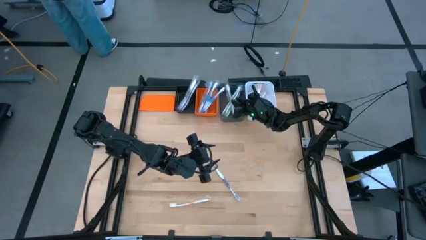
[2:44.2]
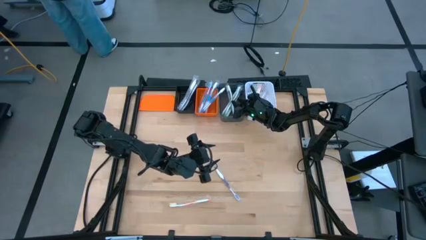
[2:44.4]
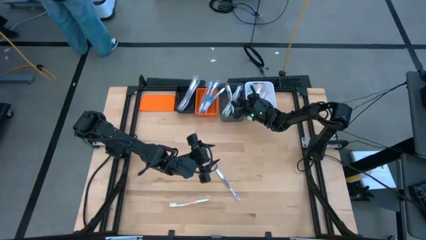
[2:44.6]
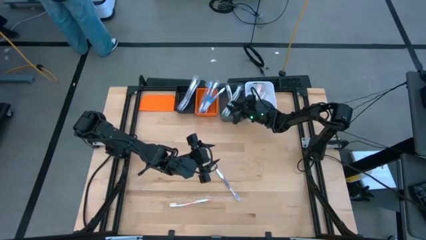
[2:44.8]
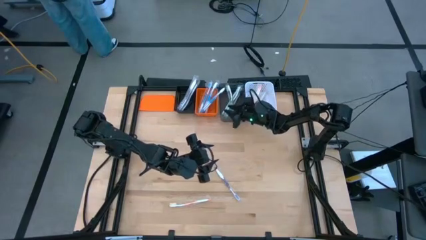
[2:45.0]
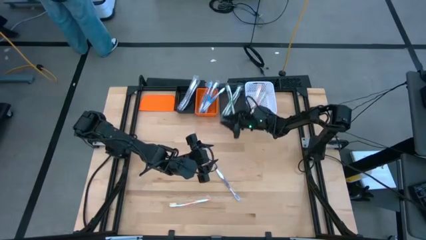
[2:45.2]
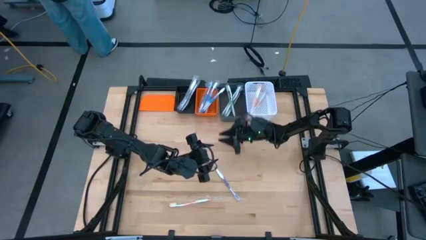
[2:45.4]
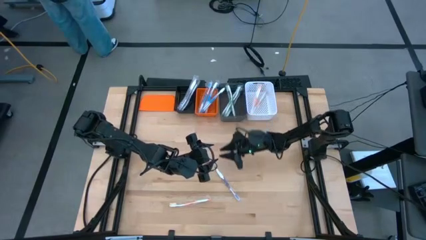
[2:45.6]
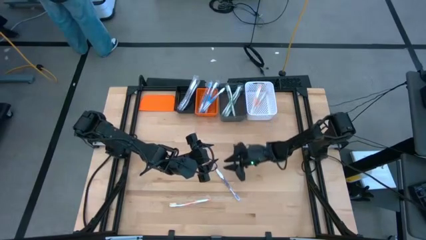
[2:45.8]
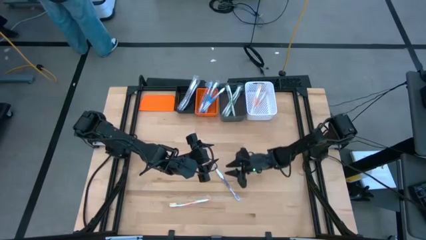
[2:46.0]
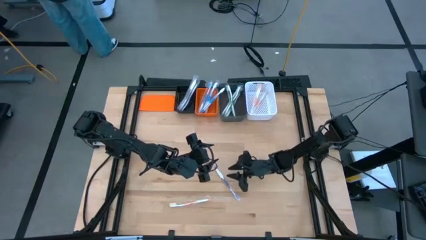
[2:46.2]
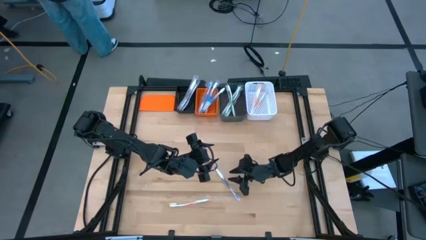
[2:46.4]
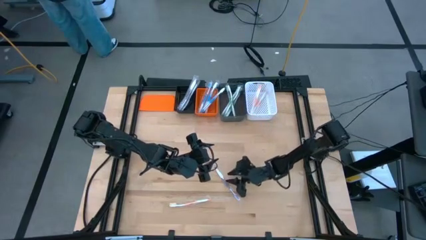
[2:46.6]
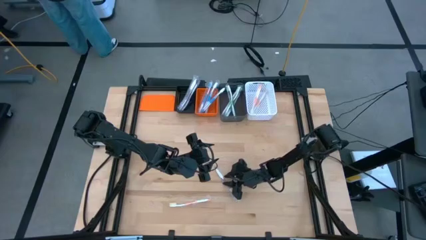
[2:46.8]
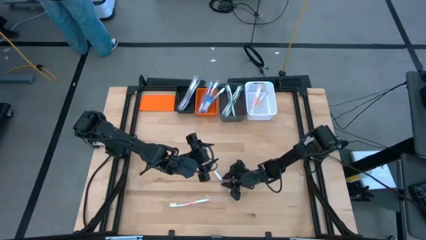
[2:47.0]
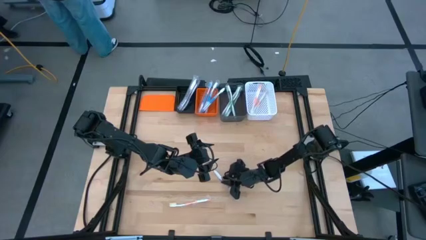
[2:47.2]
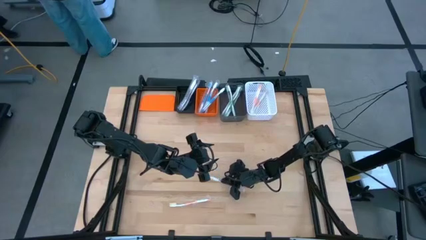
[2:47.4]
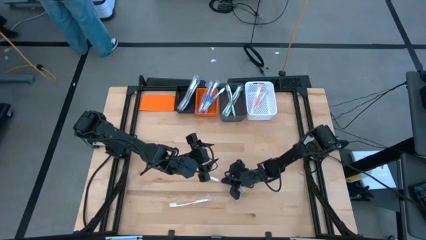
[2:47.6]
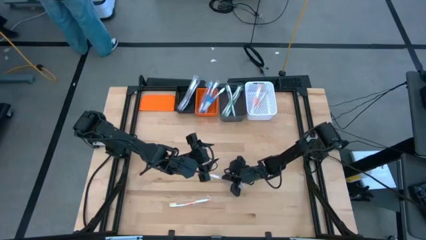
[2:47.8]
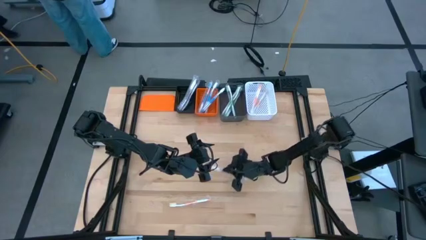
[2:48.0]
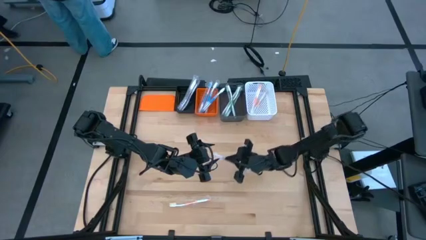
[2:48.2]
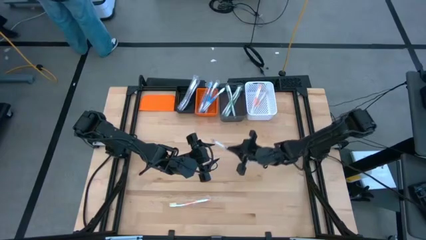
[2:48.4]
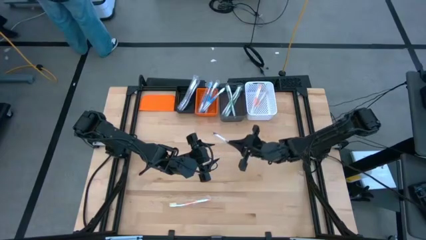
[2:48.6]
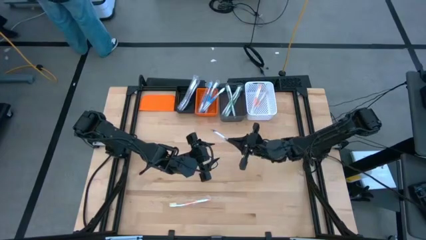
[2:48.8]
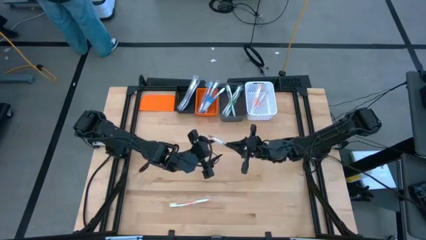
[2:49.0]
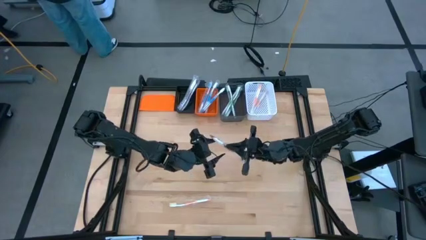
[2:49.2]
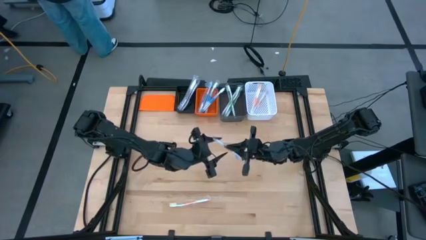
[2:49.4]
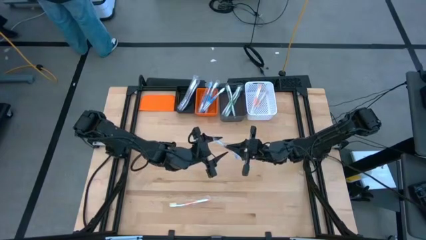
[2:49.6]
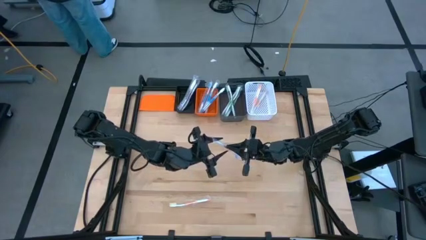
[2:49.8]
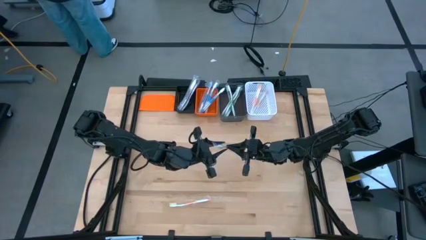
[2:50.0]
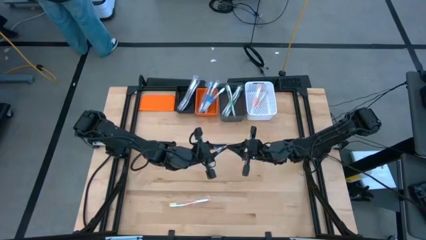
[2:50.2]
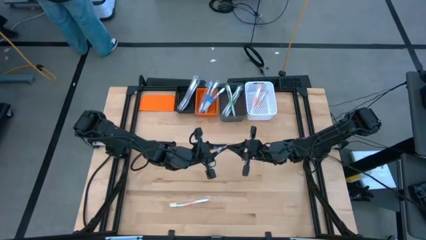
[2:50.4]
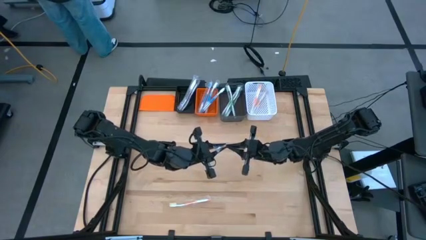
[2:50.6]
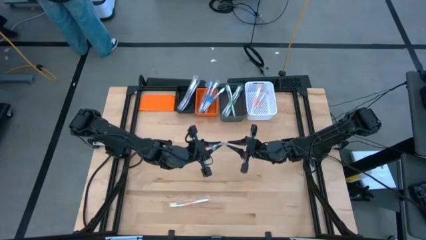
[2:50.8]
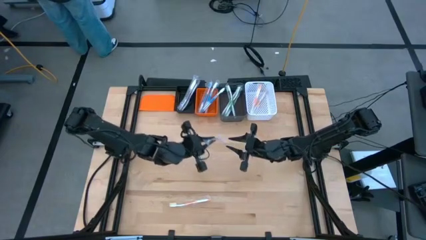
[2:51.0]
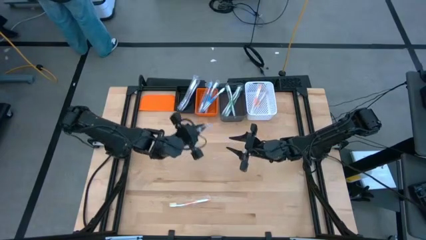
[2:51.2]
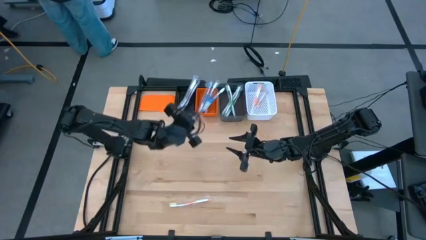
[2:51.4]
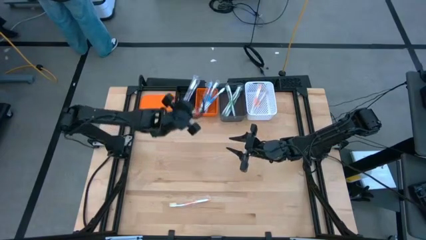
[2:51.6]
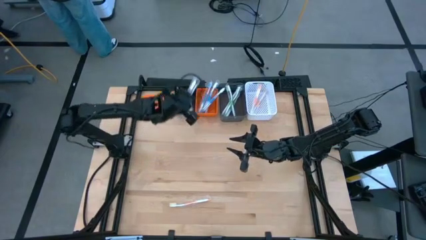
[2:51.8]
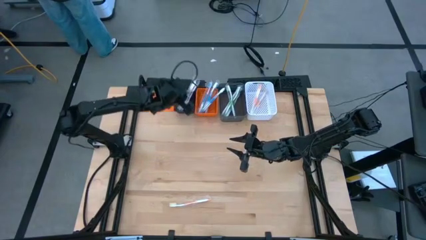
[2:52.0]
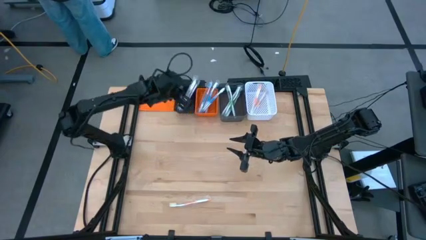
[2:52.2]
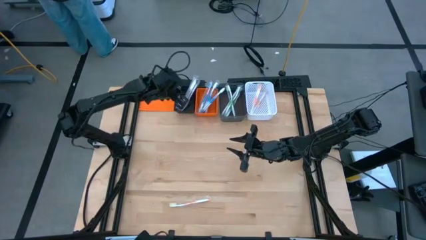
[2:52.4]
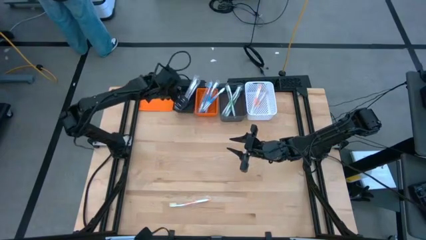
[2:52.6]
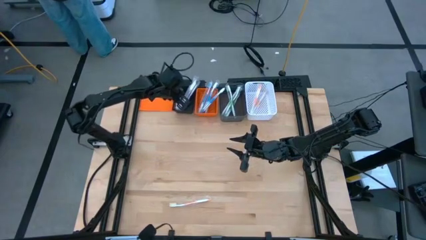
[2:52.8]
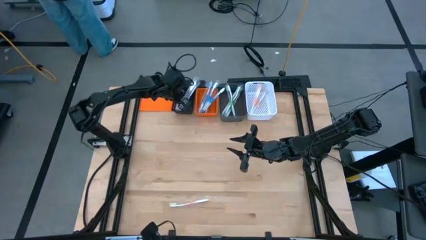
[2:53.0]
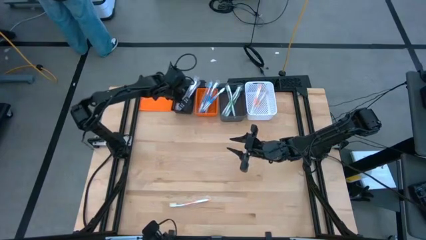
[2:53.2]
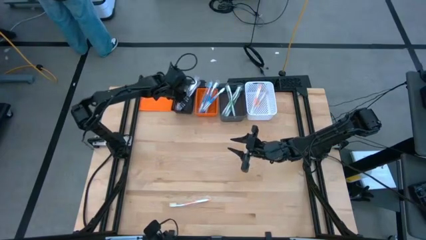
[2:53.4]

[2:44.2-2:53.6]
Task: Pick & Place Toothbrushes
Put the purple toothbrush into the black bin

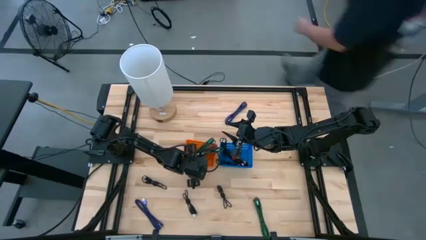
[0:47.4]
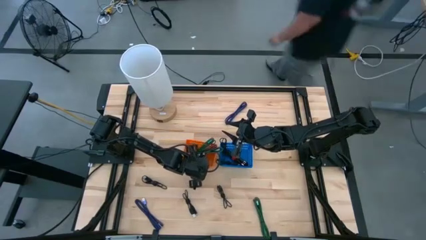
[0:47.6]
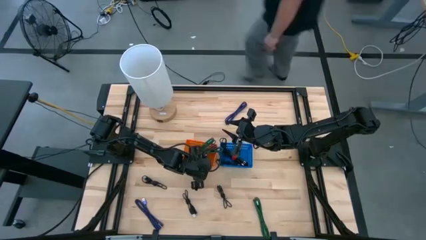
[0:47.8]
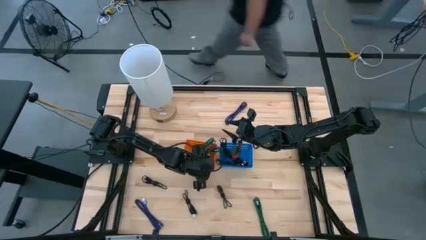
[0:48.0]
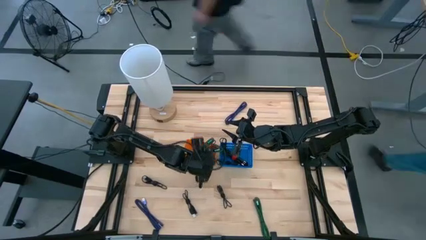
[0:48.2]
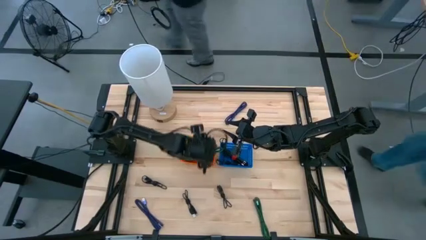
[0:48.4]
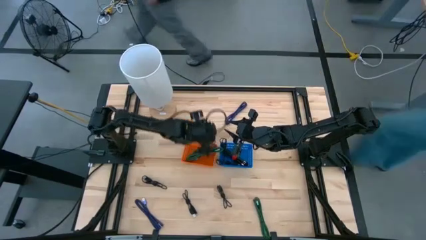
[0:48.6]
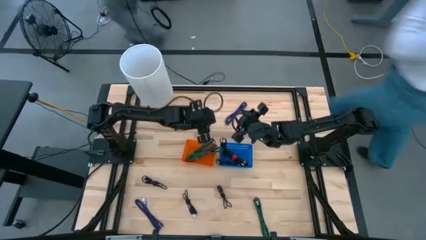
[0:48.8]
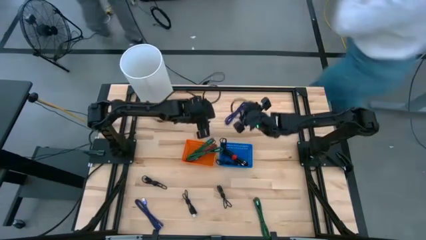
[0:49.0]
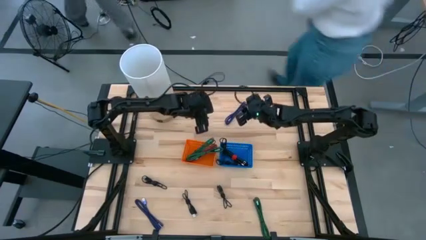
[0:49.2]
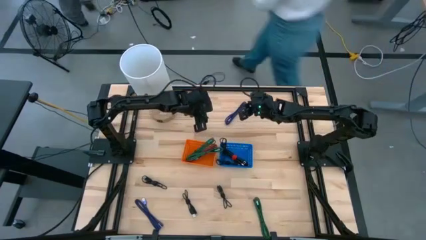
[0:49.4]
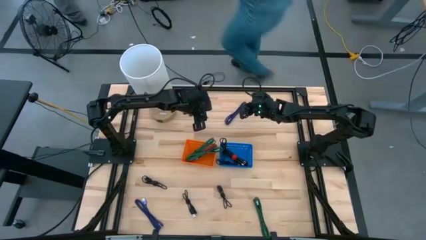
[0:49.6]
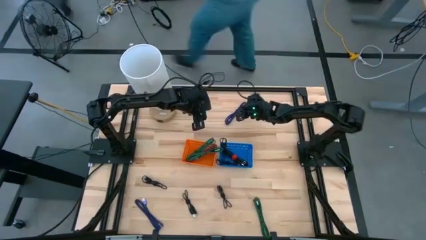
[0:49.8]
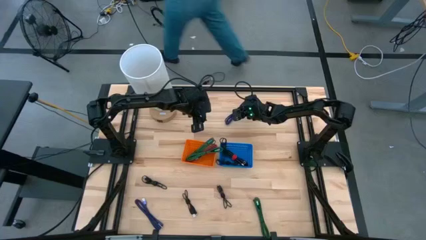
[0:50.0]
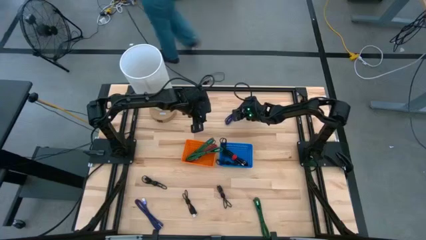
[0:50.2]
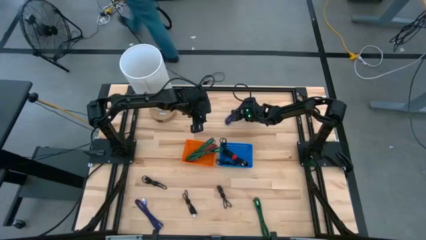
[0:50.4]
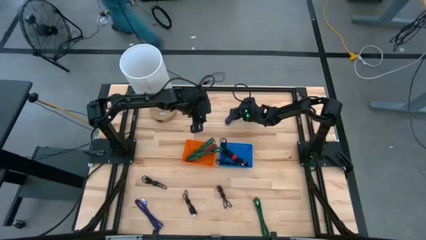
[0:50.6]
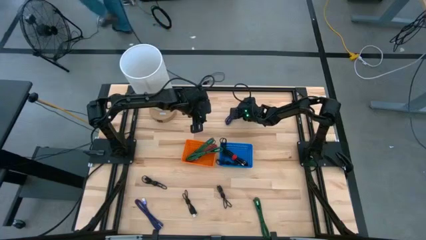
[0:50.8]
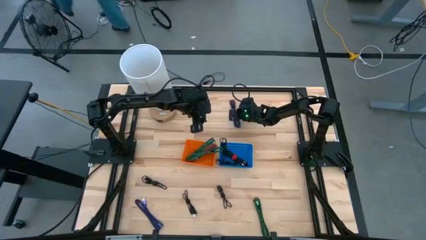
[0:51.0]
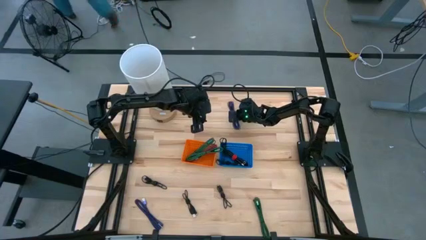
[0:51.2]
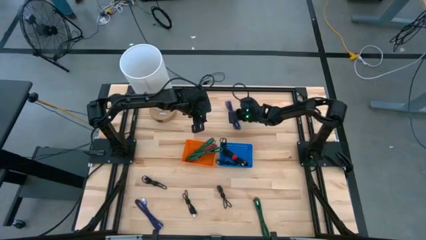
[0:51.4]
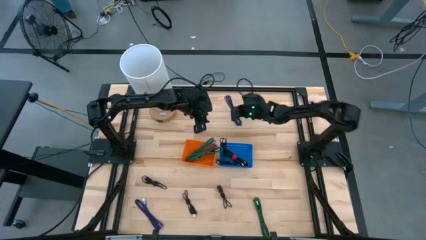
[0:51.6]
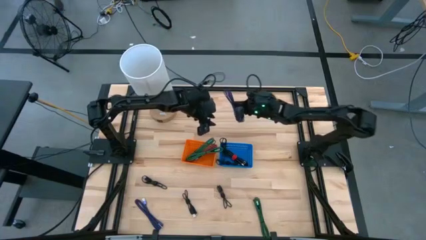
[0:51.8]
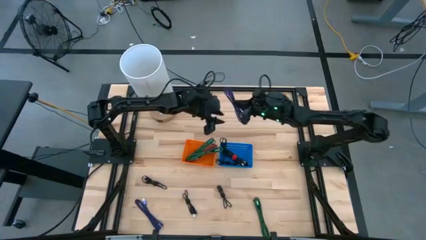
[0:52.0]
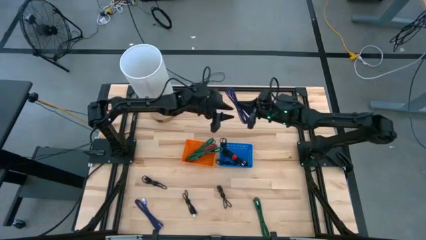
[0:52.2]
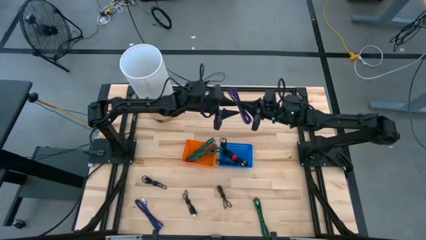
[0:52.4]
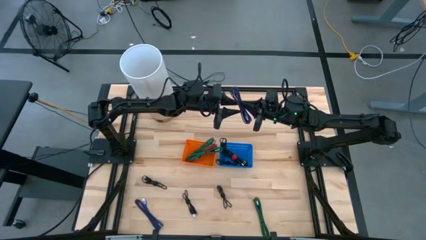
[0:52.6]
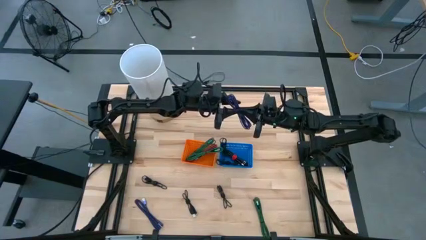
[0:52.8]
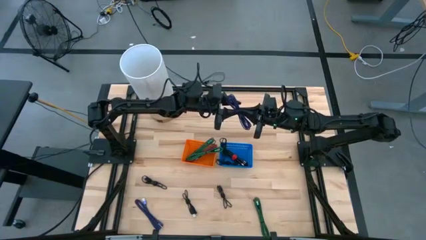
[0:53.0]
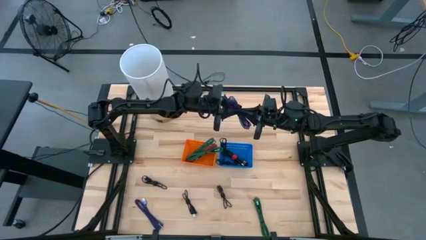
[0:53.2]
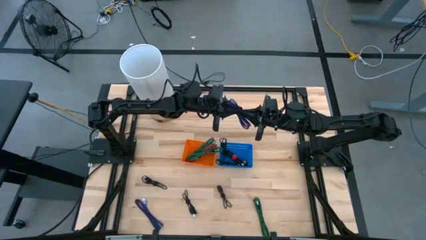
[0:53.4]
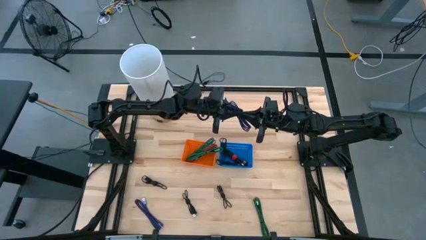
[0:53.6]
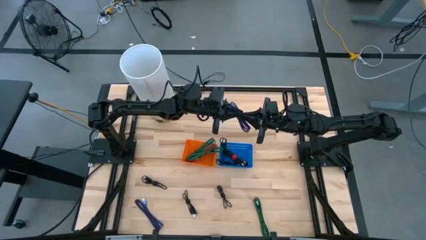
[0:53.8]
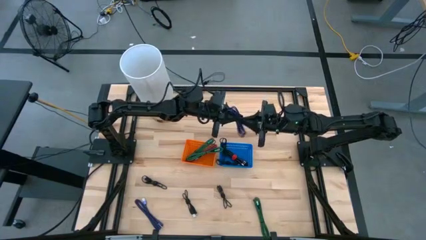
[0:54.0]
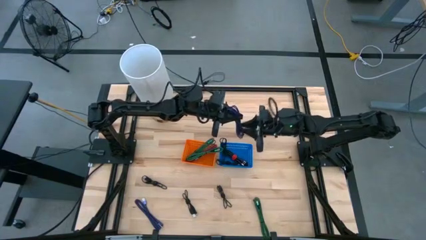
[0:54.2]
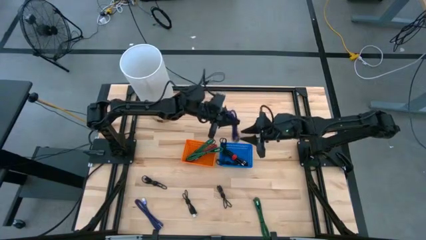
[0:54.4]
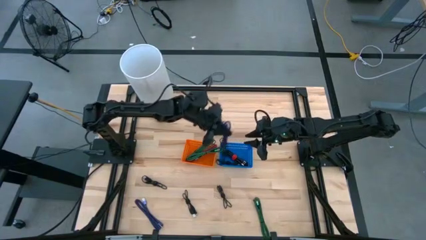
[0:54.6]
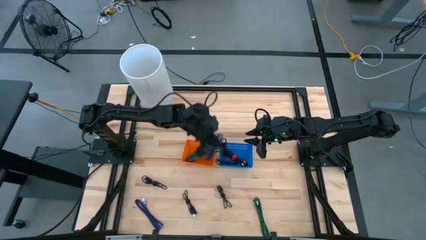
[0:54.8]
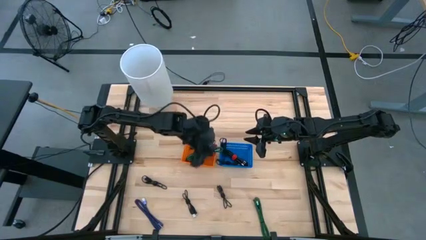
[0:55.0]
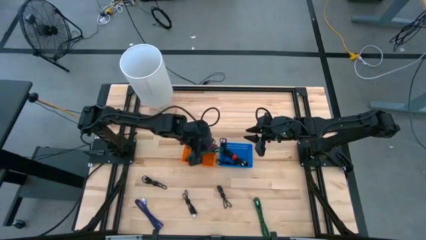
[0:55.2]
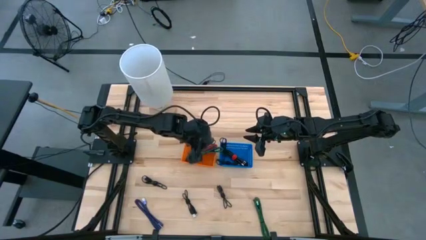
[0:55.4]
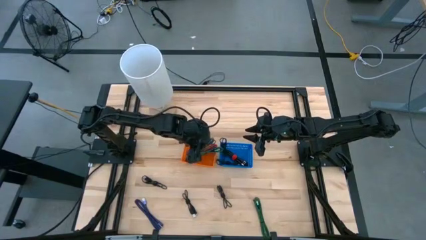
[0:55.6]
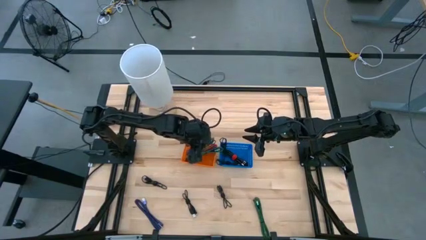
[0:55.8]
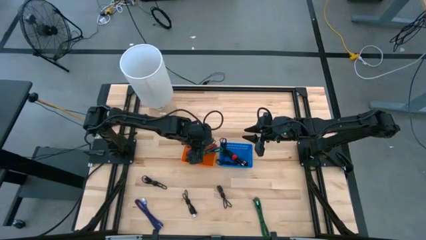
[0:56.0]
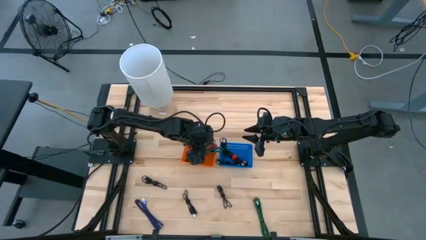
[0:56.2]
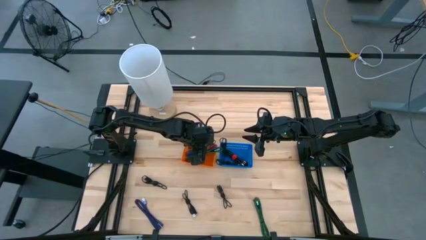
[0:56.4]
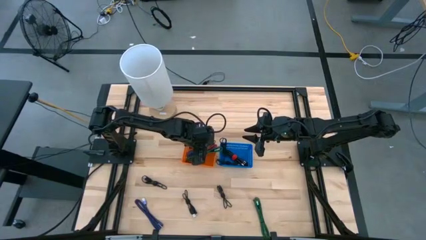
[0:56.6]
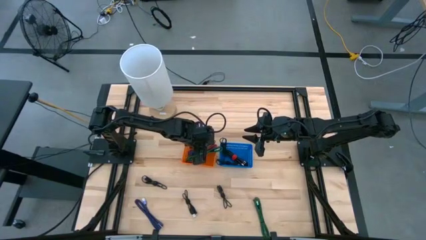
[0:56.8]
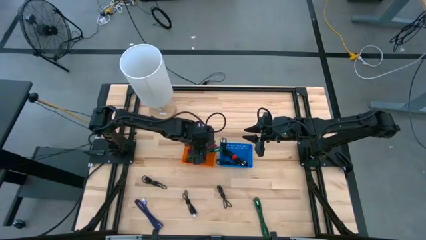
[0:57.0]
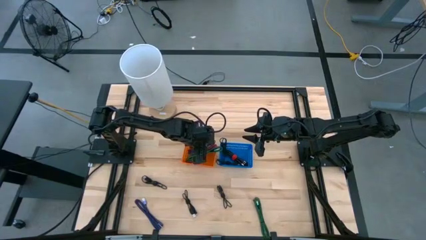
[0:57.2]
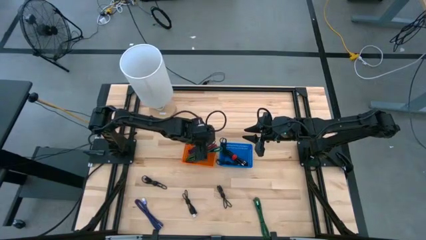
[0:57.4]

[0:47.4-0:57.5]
Task: Pick & Place USB Port
Put the violet charger cable into the orange bin
